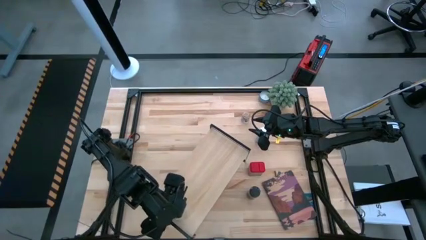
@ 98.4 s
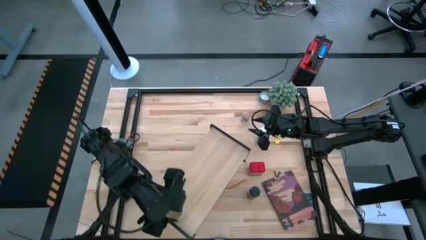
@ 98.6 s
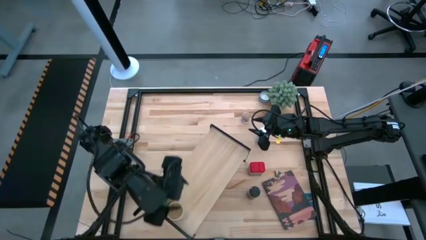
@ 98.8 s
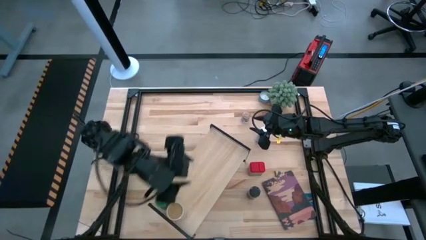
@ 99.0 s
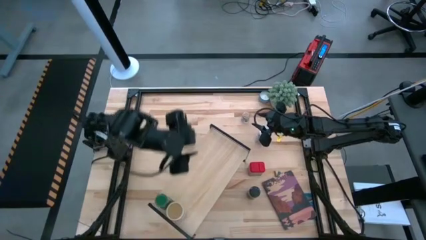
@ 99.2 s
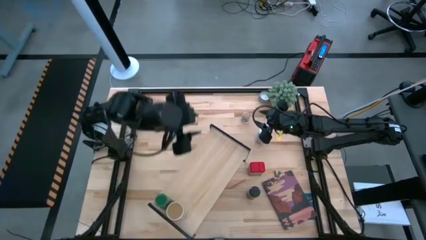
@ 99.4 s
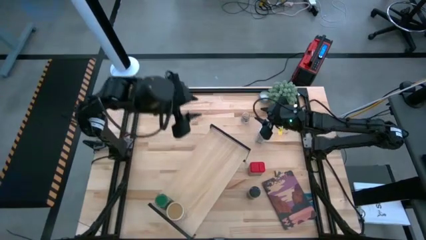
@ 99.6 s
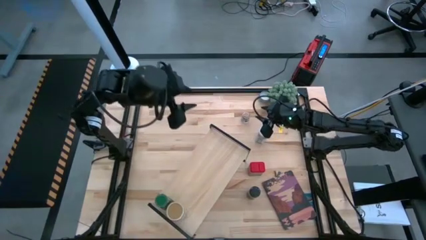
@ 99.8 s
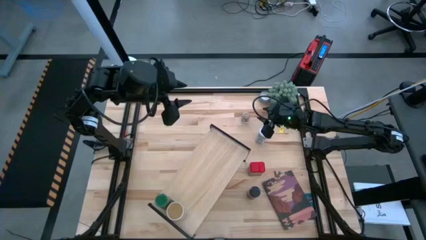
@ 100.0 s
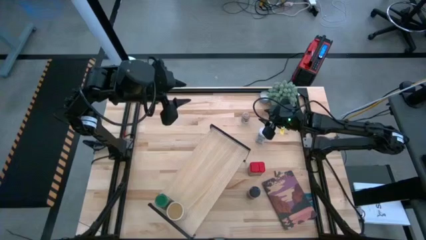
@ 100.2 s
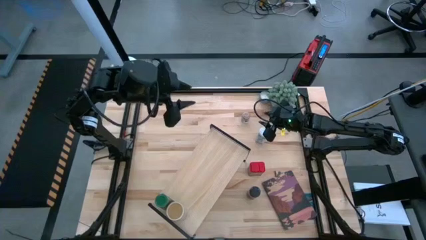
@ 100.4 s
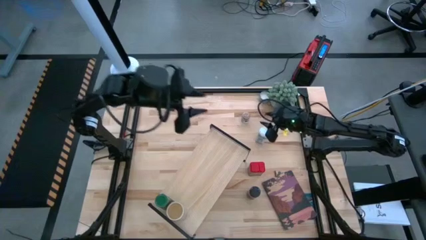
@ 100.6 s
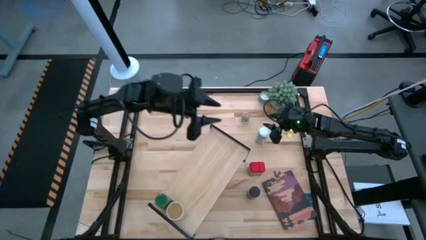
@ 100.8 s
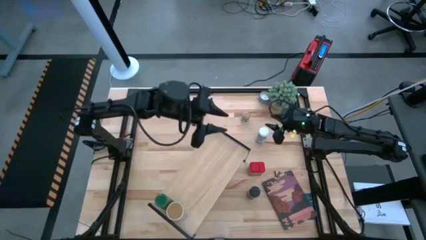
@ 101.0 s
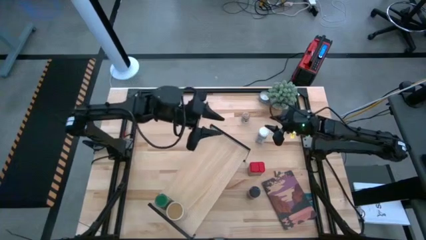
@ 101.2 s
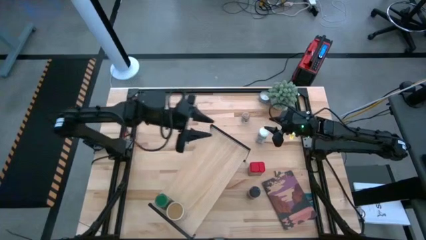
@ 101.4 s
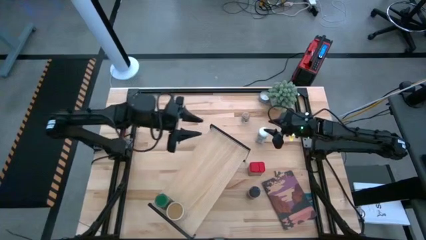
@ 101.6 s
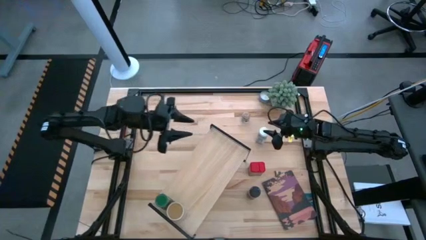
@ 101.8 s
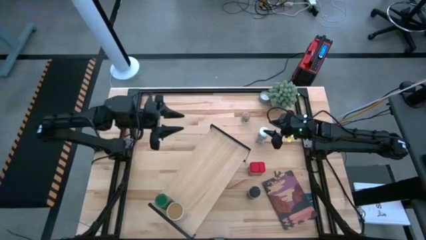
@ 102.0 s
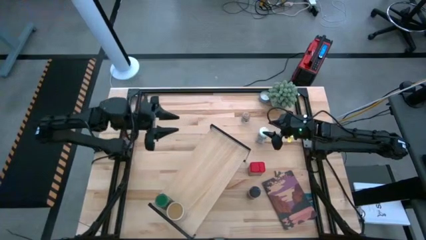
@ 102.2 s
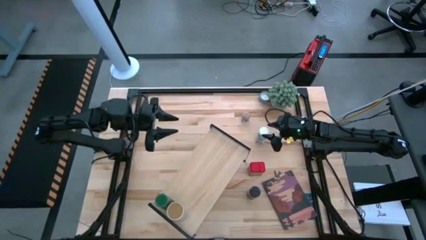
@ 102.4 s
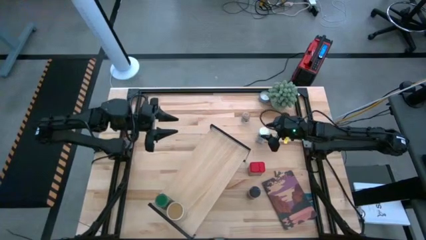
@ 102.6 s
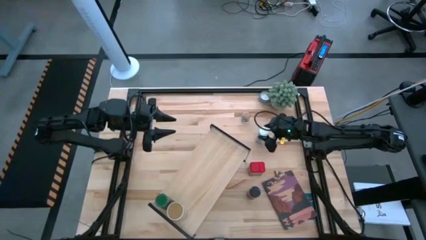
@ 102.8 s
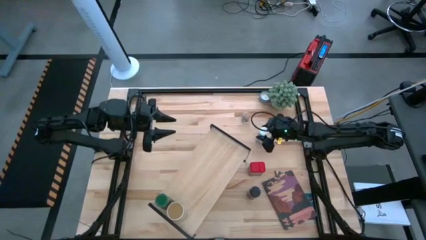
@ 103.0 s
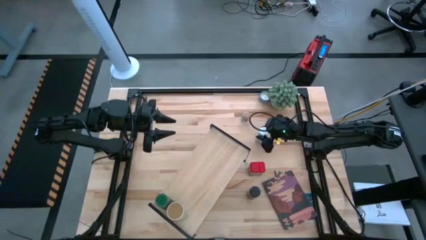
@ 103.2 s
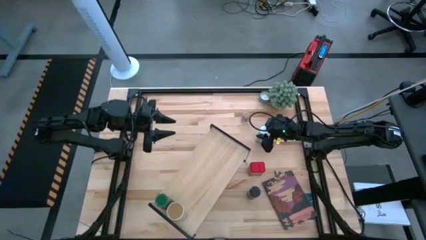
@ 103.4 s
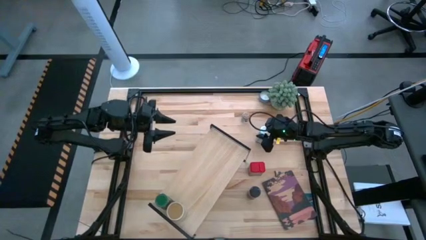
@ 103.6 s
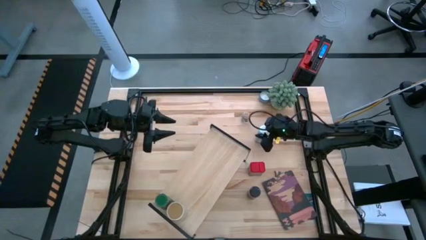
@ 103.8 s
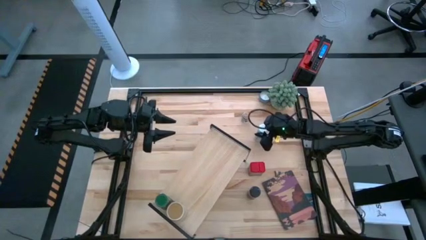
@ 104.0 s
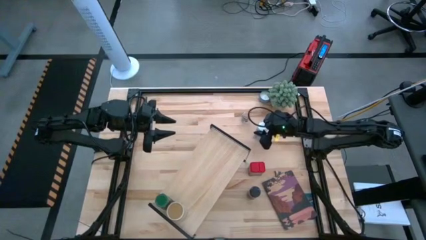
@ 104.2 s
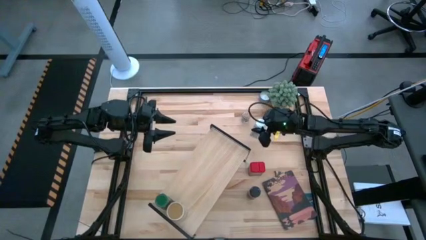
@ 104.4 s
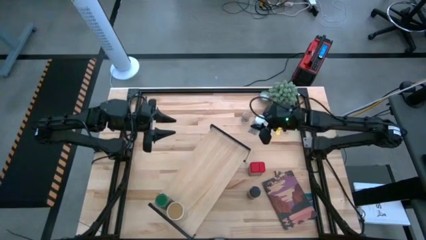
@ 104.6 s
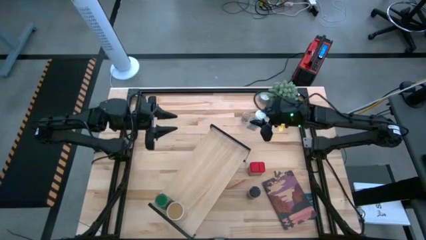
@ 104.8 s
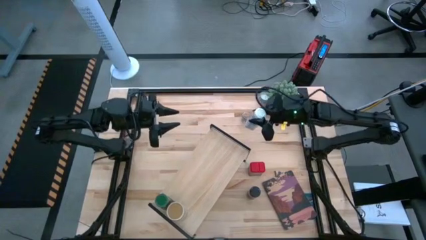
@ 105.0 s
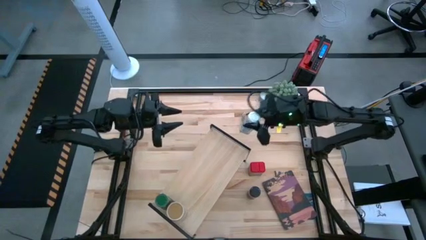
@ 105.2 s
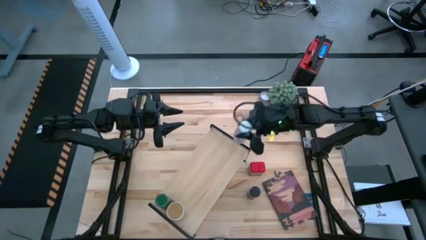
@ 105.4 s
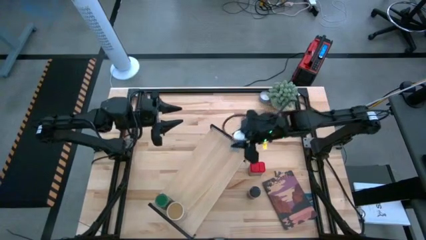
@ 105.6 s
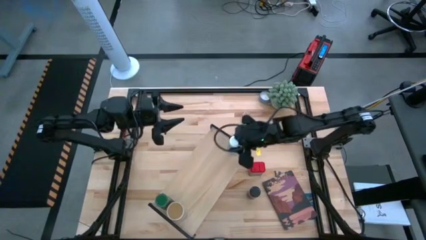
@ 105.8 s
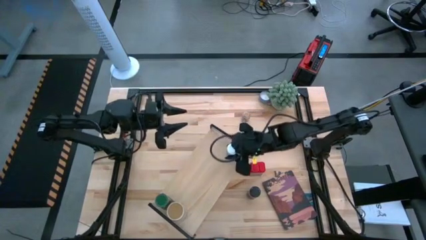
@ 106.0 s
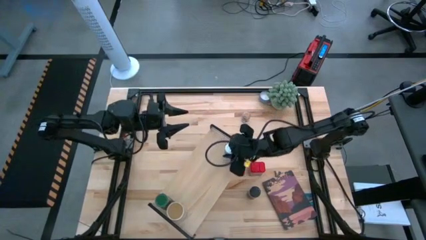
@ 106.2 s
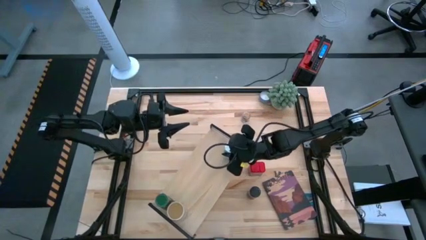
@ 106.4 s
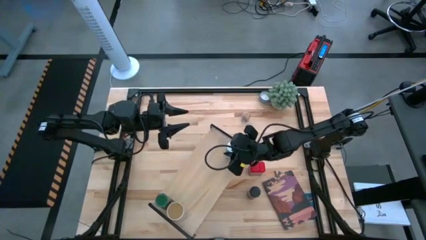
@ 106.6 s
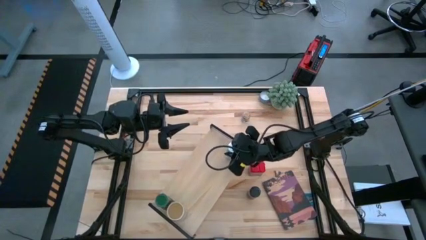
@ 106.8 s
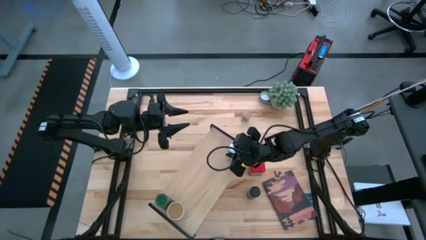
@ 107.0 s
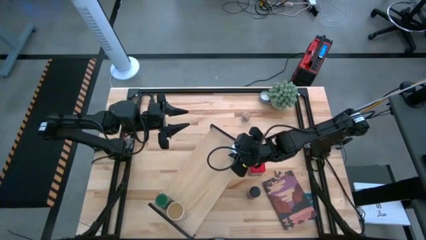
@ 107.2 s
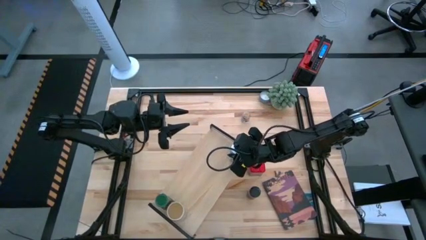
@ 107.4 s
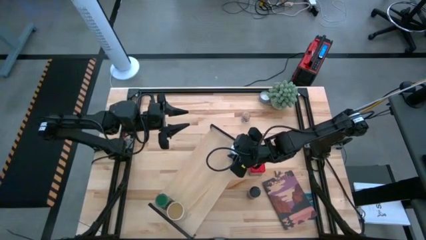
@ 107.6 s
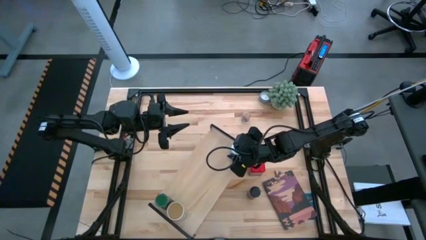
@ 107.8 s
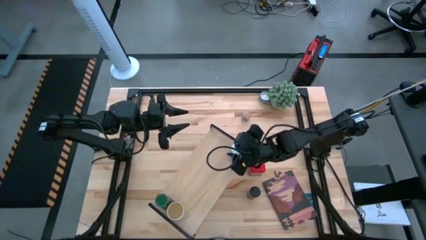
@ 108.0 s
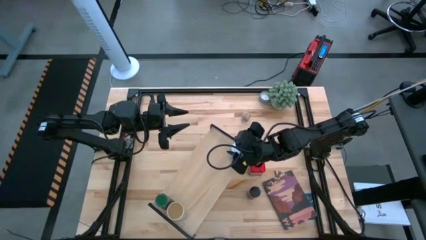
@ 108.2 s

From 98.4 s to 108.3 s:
Task: Shelf spices
Put the white seasoning bottle on the shelf

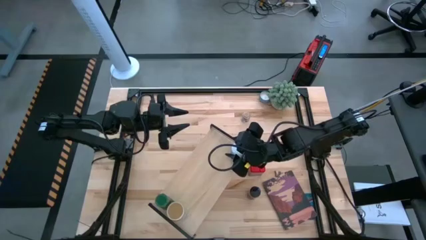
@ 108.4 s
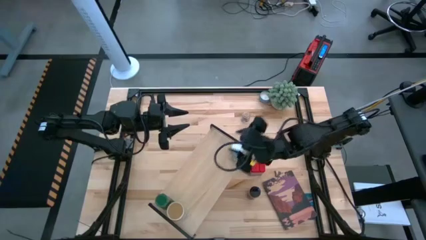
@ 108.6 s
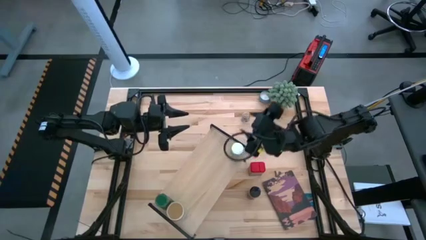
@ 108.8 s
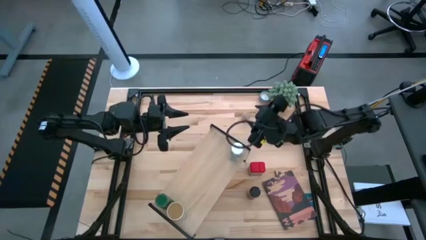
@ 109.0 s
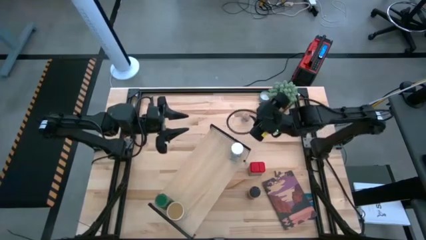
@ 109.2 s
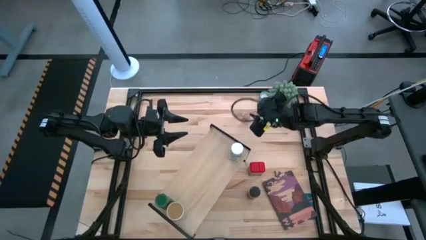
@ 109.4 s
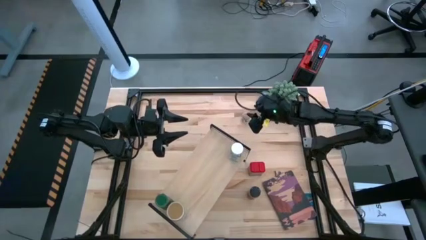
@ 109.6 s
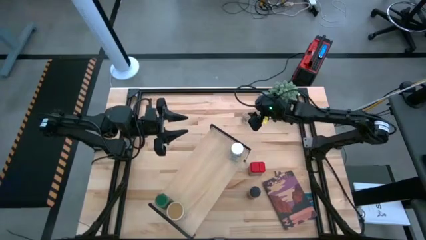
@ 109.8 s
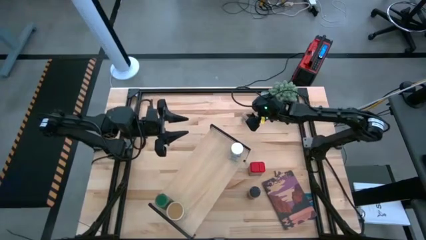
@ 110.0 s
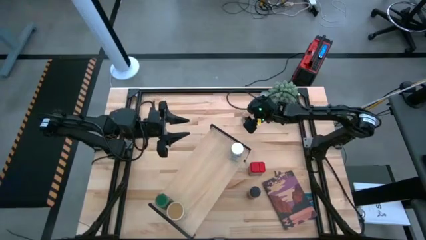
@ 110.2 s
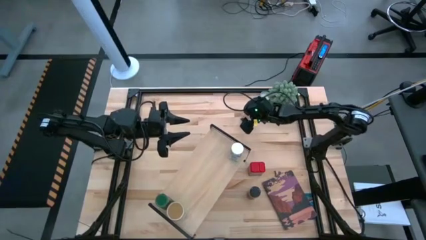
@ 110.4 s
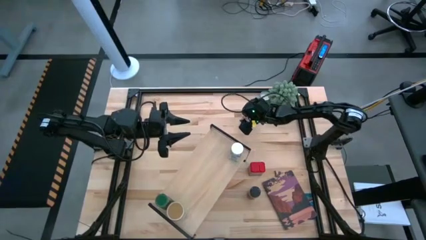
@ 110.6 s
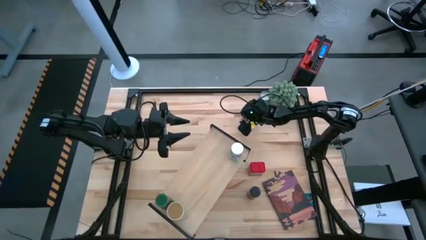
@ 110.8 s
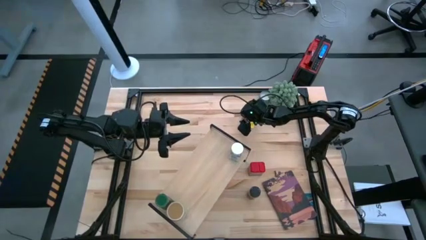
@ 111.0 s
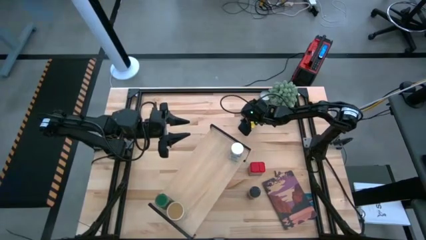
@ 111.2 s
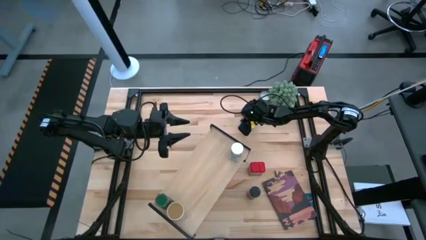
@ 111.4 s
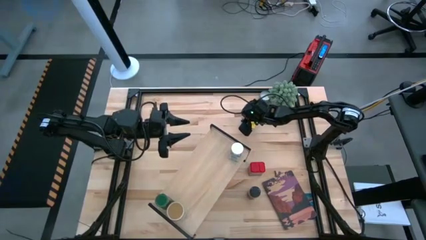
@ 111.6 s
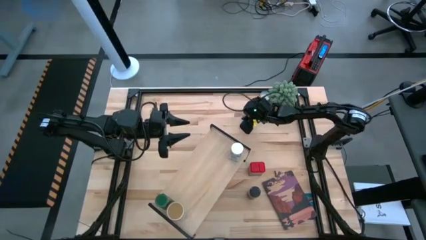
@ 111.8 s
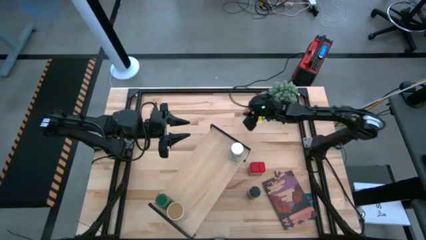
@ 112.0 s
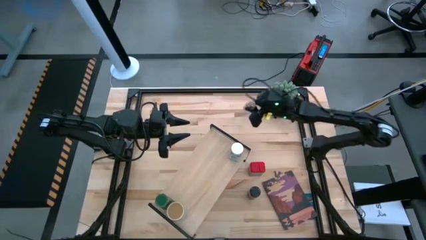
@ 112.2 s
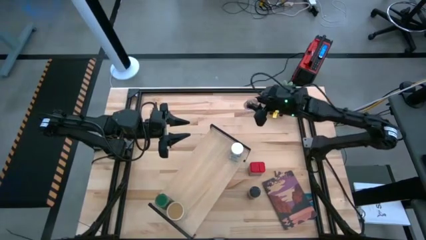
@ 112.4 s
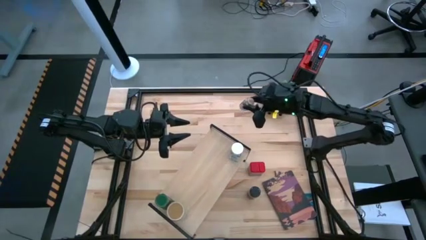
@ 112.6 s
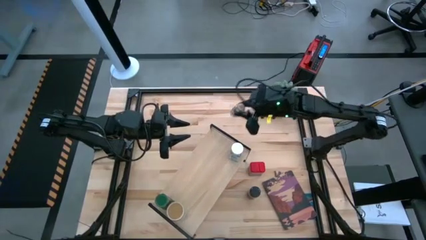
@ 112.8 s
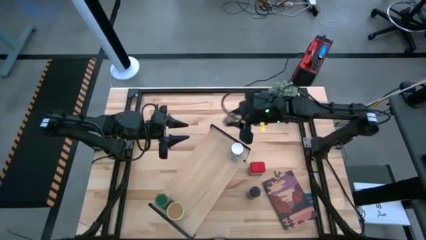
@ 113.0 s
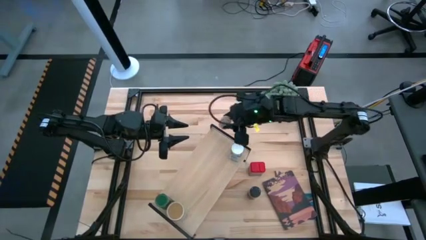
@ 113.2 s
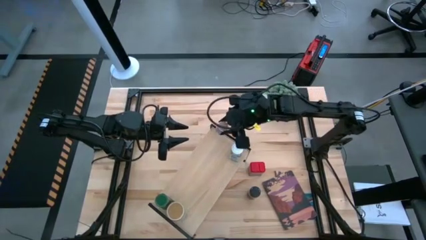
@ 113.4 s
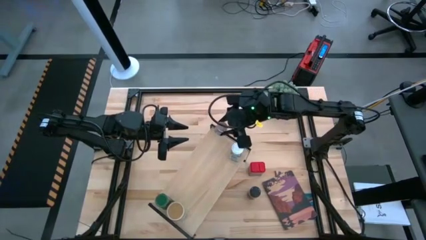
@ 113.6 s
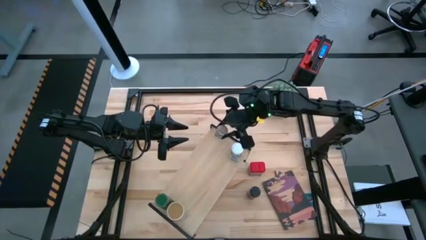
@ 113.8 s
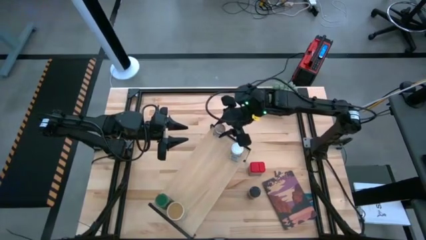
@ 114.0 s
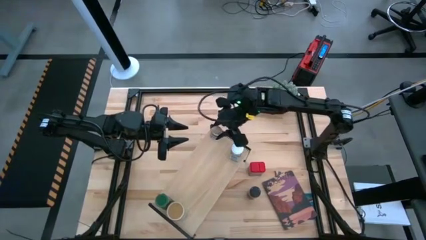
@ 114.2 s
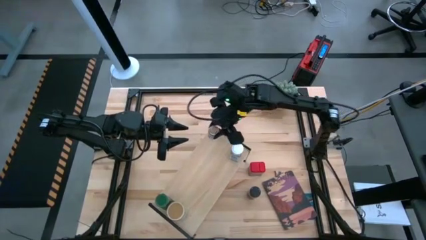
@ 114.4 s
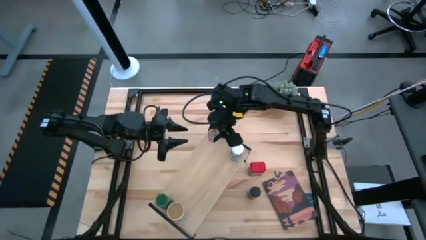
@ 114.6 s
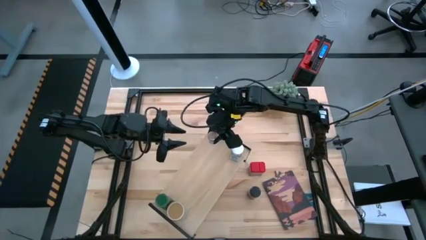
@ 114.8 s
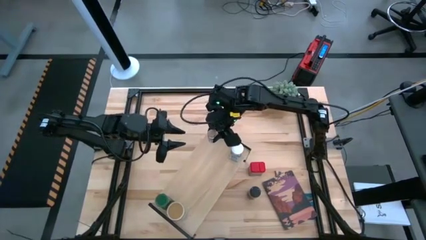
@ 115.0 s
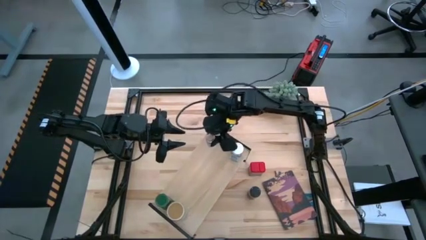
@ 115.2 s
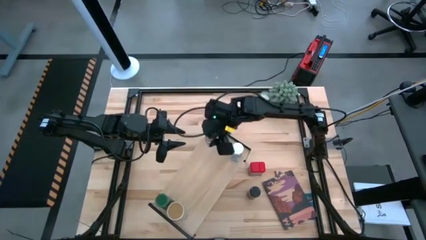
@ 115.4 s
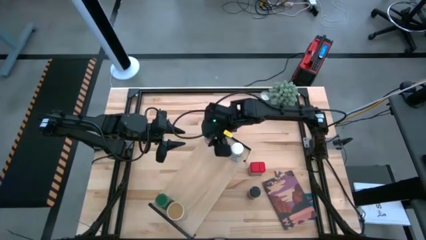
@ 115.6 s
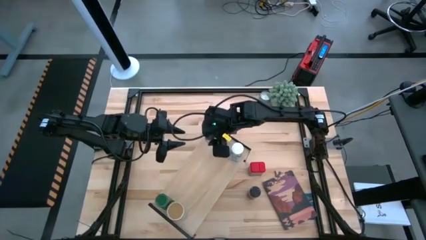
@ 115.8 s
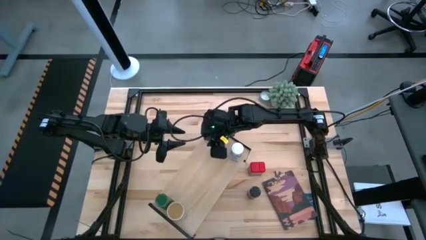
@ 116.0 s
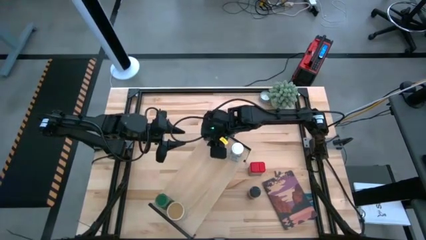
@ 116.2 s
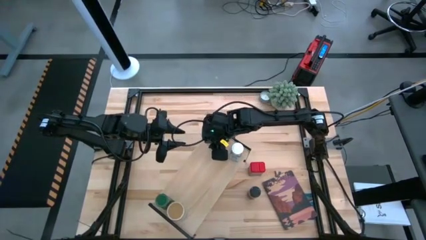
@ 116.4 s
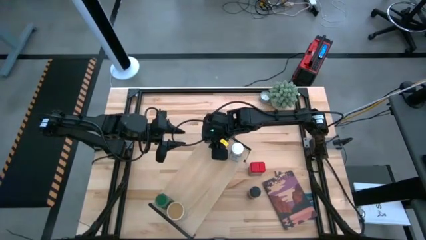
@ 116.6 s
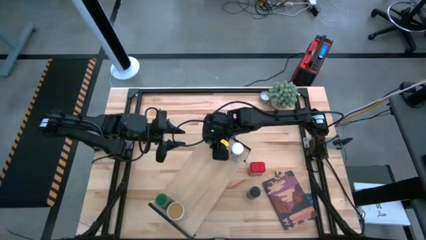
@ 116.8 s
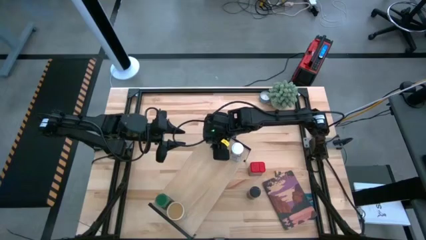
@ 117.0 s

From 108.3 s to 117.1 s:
Put the brown seasoning bottle on the shelf
